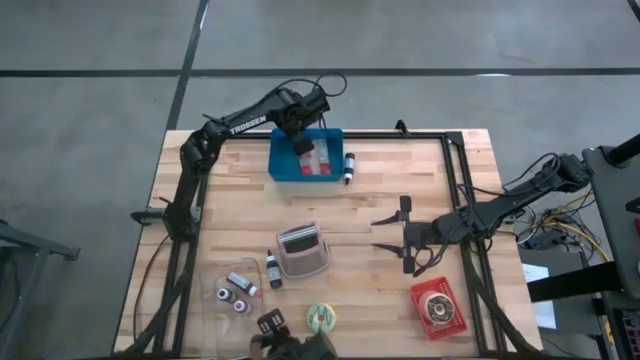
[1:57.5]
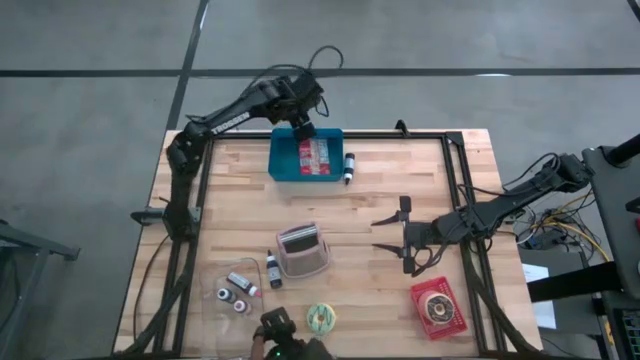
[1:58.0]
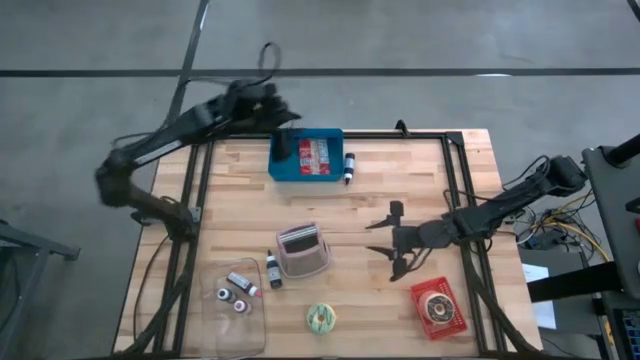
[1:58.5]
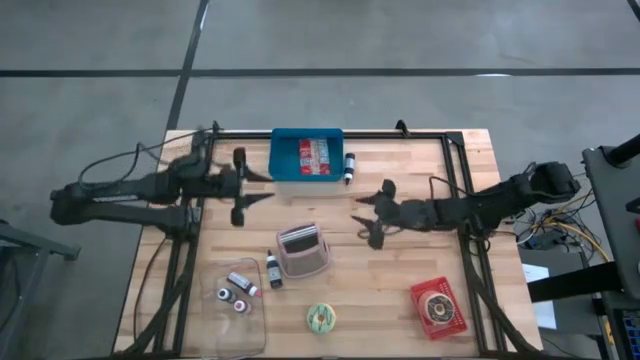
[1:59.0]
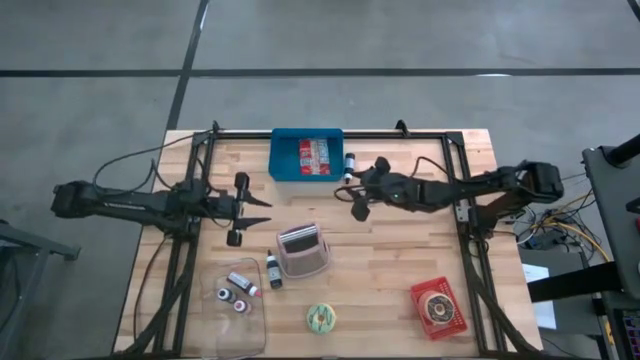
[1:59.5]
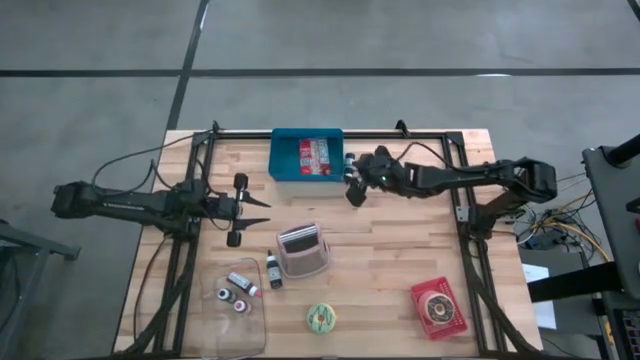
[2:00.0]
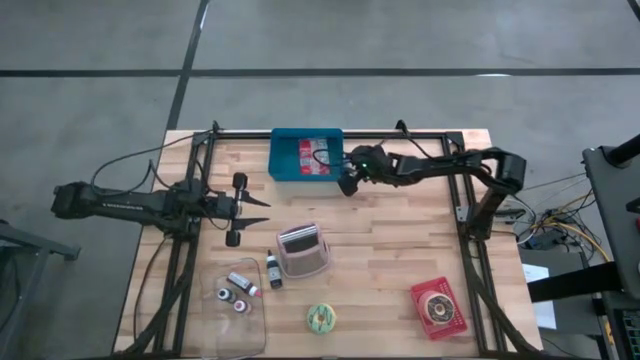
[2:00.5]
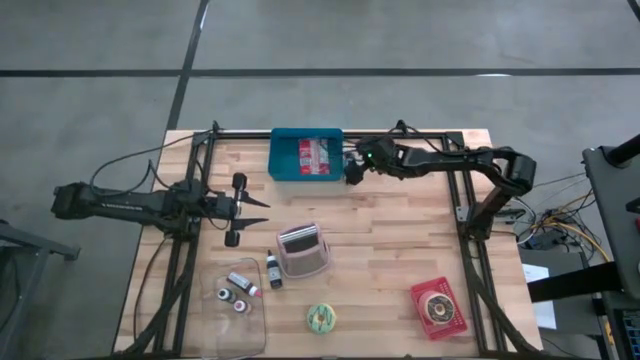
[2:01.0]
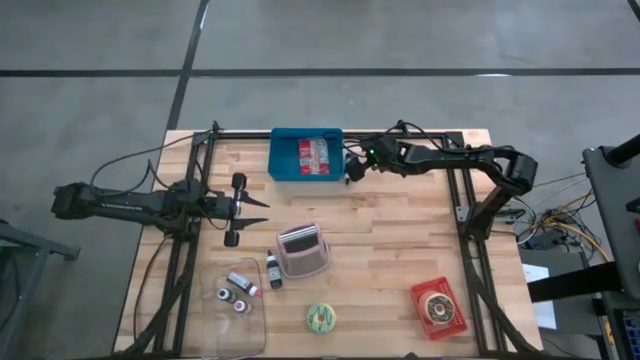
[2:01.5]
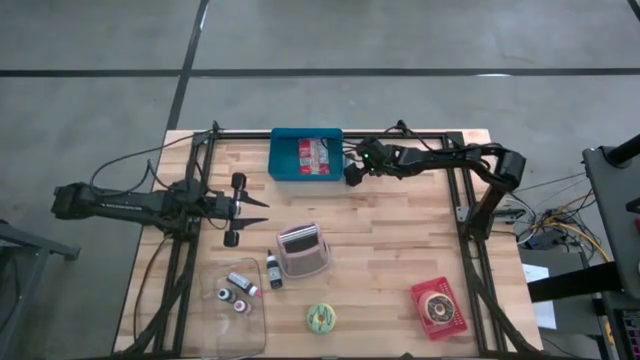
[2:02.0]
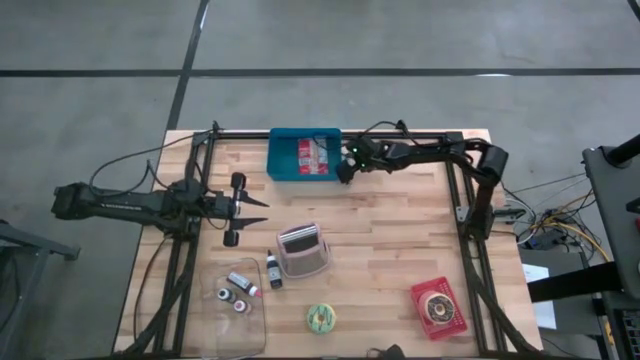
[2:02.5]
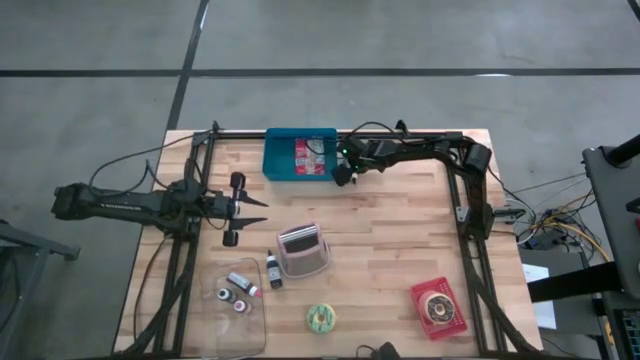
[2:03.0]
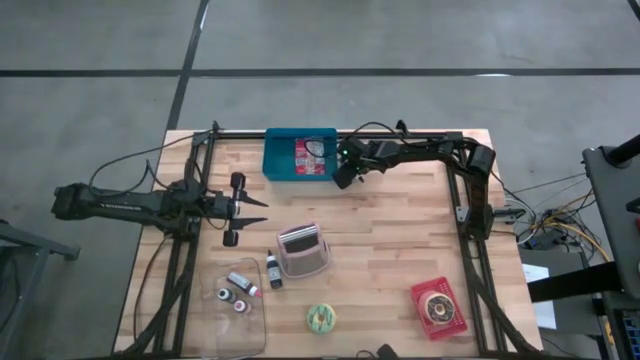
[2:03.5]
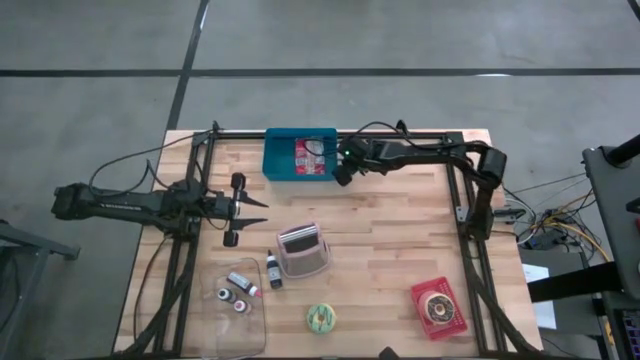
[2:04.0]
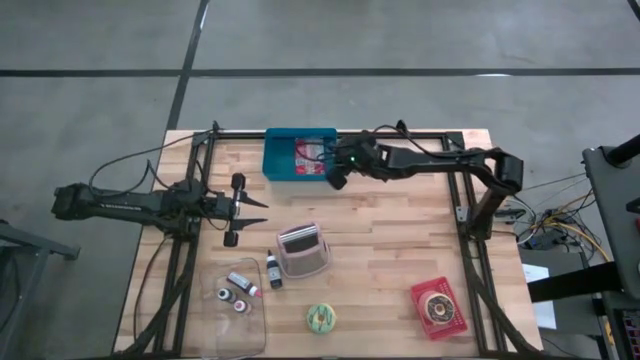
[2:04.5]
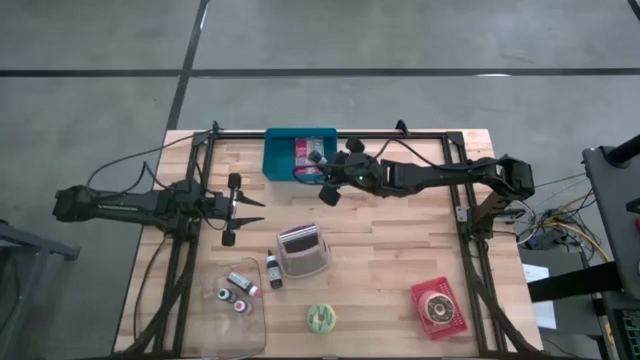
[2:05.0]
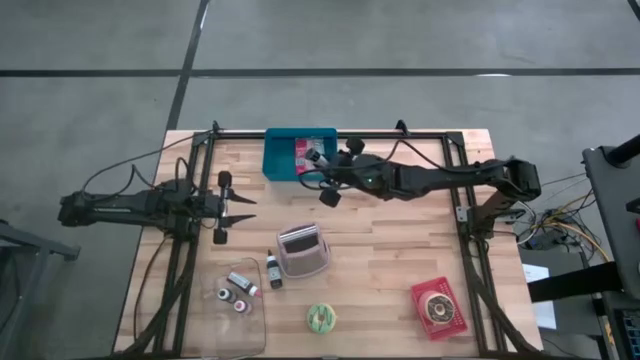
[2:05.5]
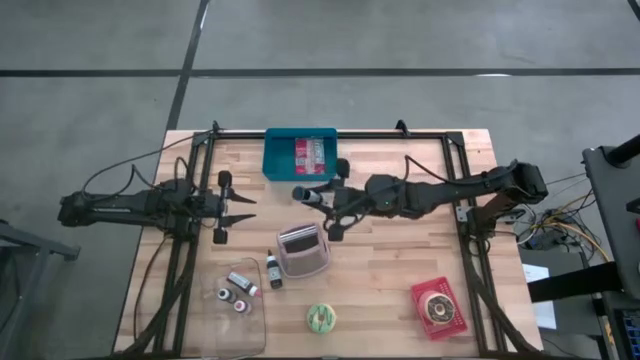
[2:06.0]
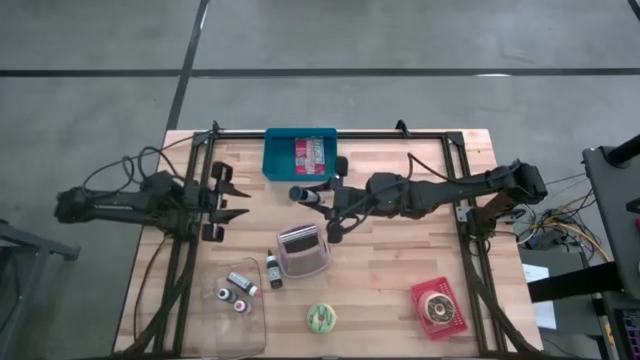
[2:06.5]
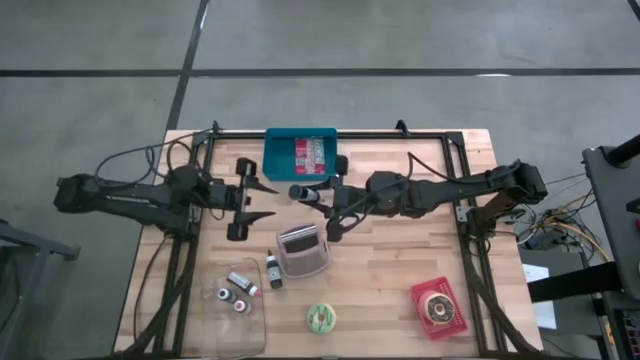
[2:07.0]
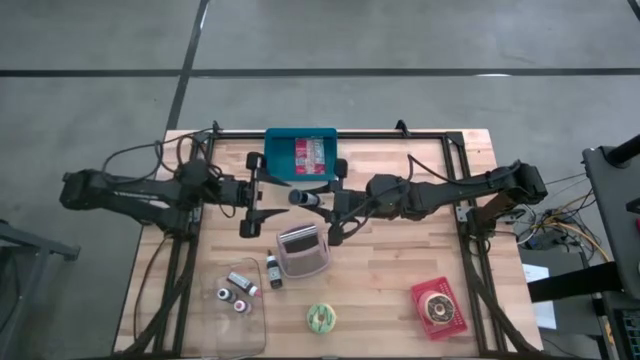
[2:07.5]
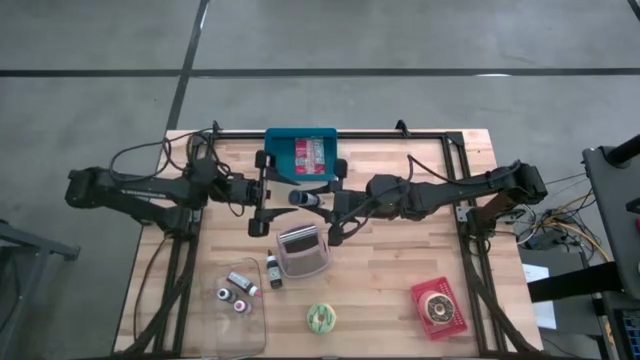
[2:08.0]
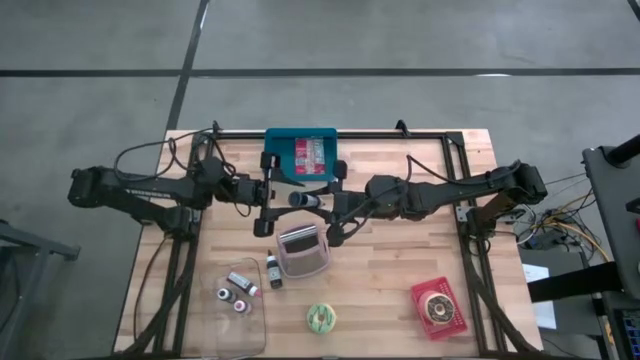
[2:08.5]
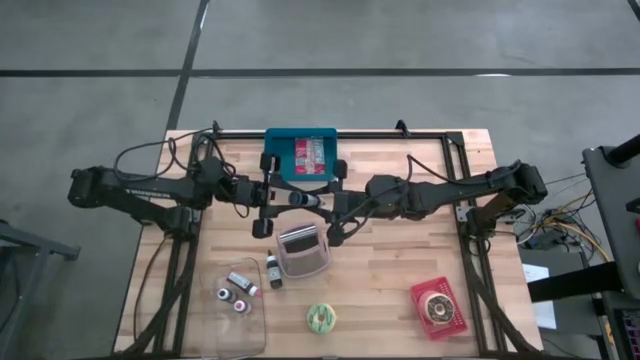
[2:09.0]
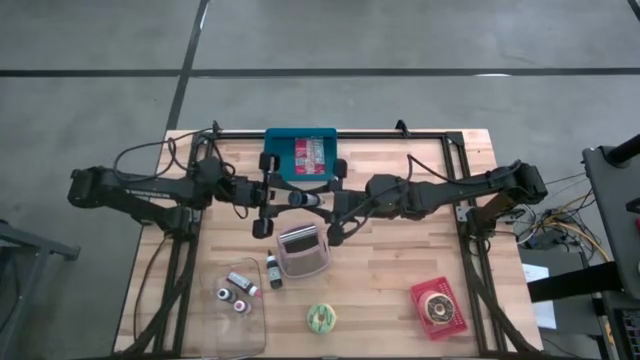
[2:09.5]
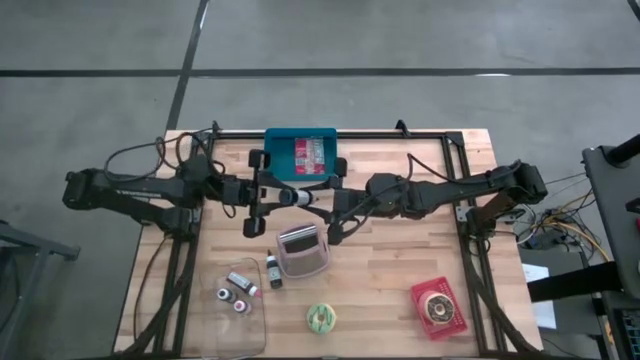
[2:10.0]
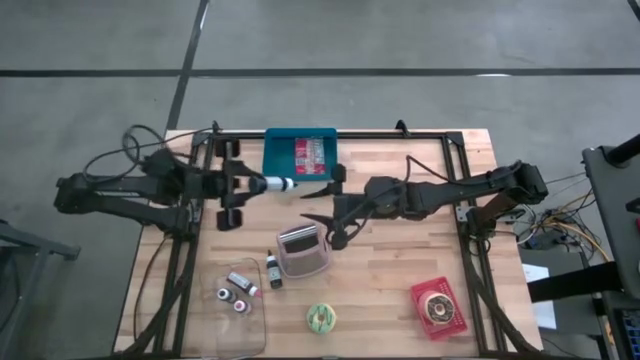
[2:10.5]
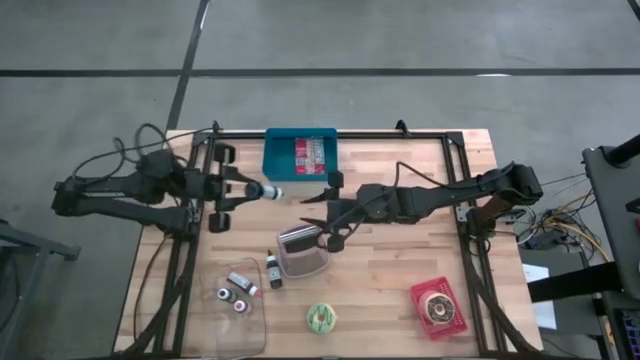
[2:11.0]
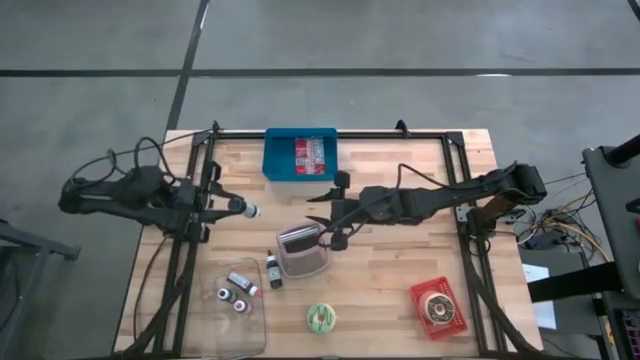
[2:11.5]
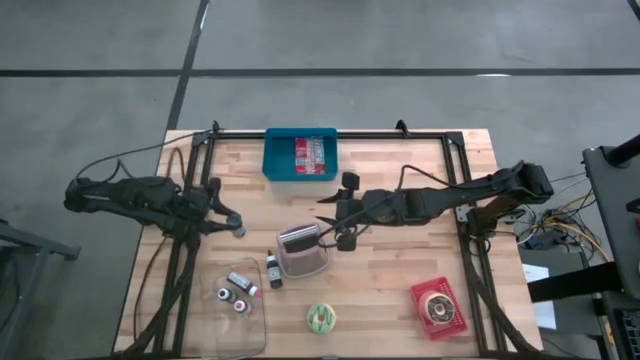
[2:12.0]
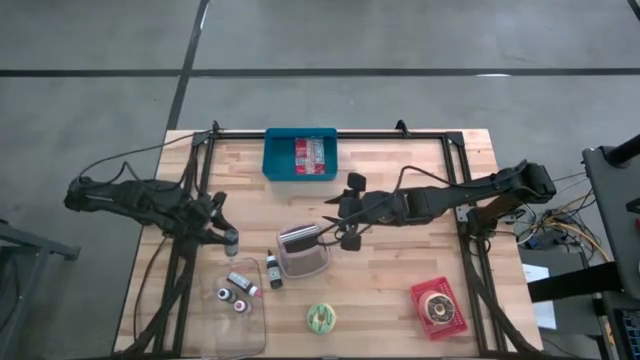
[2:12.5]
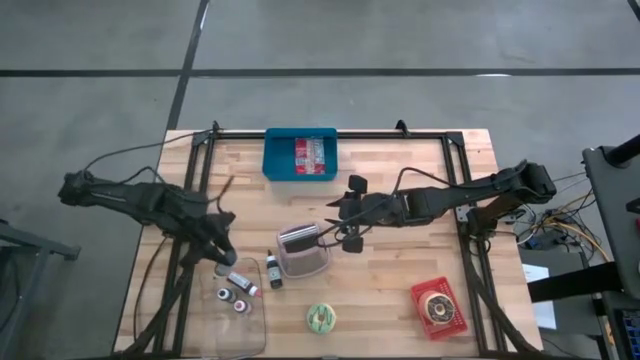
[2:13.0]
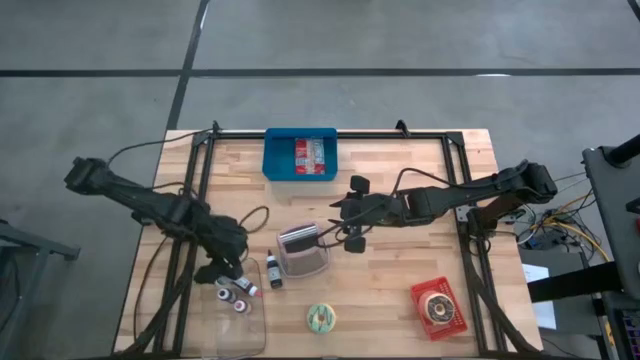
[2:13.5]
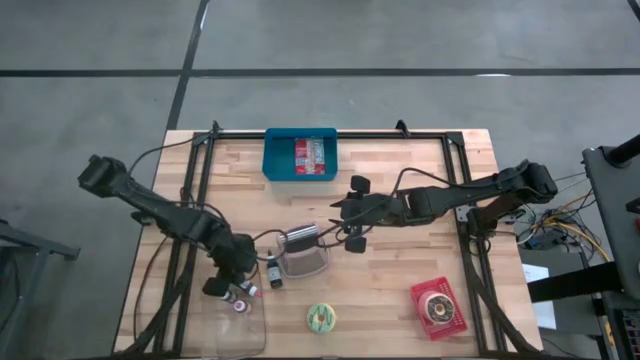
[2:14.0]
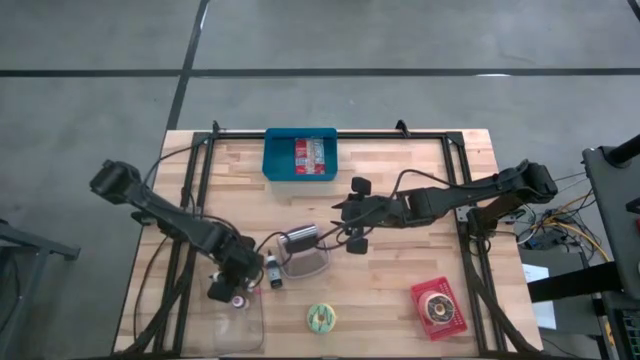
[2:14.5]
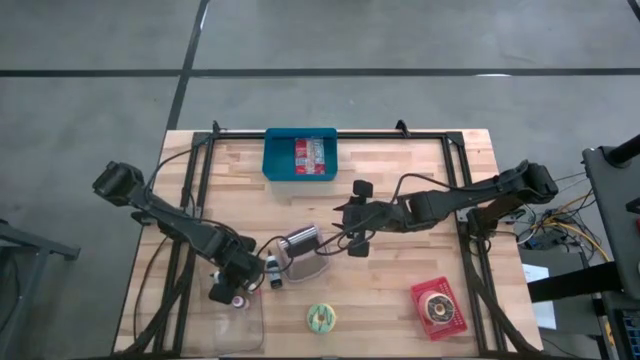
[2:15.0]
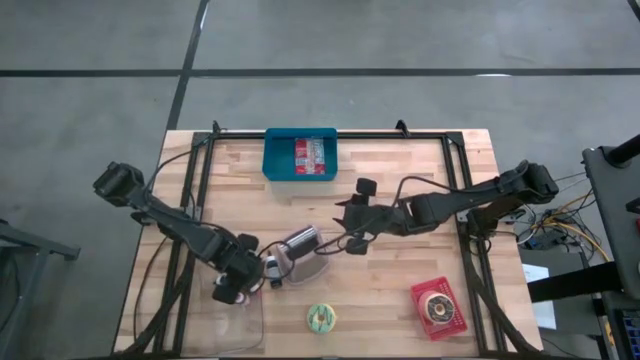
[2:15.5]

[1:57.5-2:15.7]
Task: Pick & Place Food Item
Put the top black food coloring bottle into the transparent bin

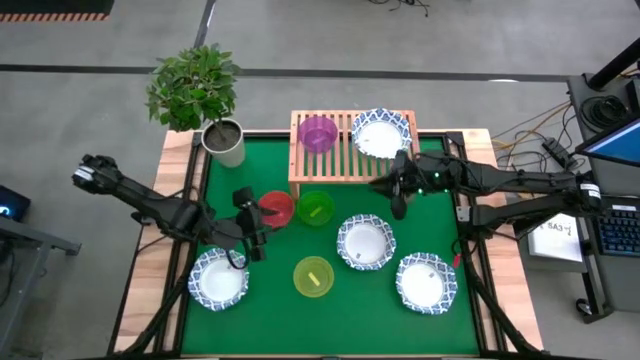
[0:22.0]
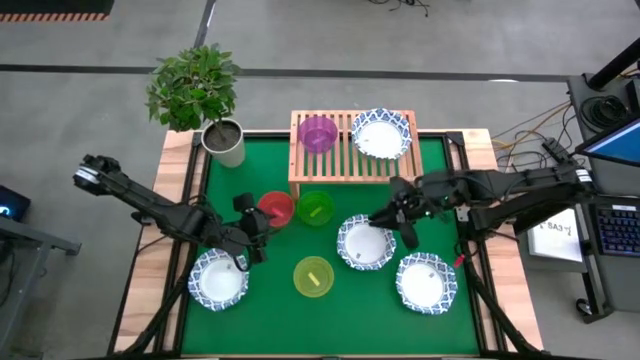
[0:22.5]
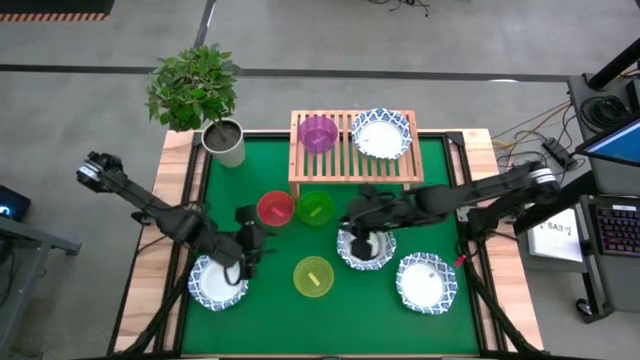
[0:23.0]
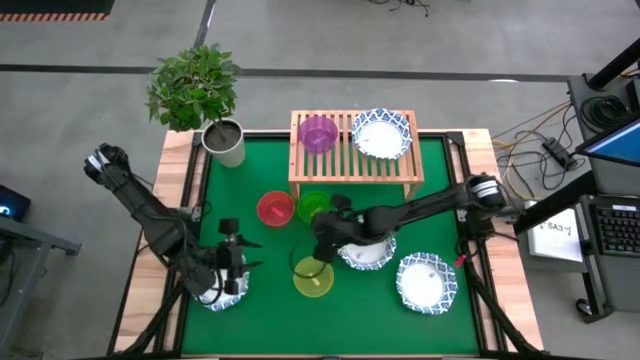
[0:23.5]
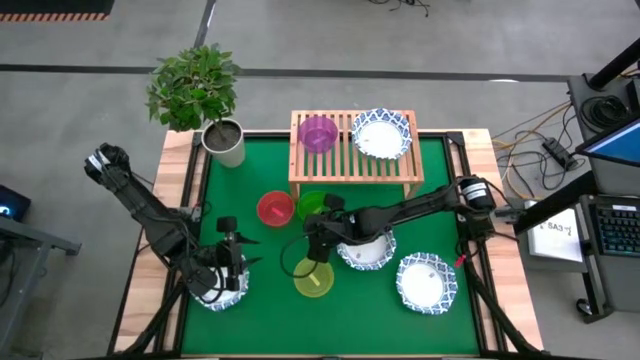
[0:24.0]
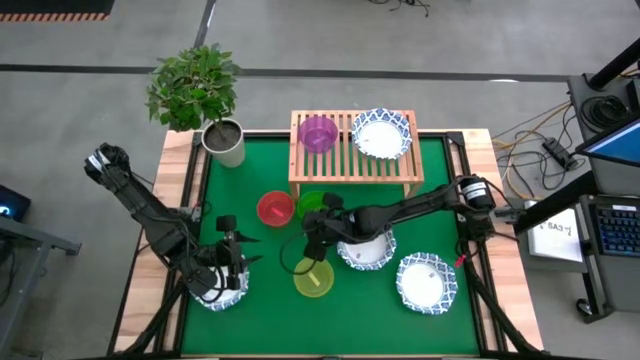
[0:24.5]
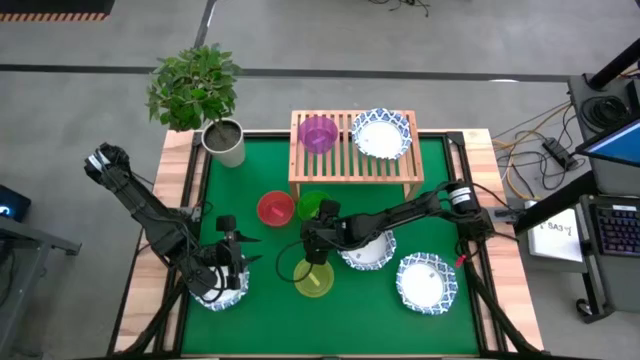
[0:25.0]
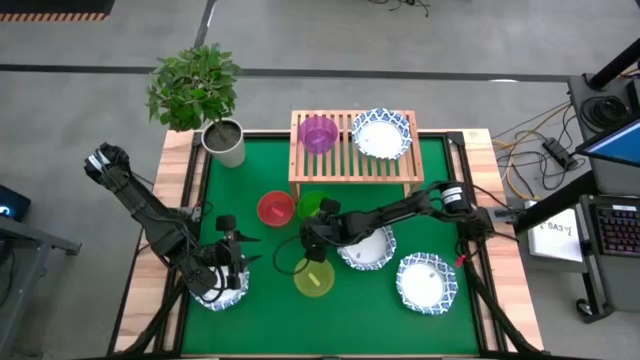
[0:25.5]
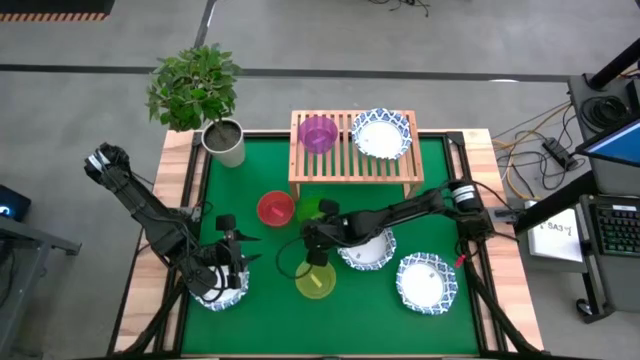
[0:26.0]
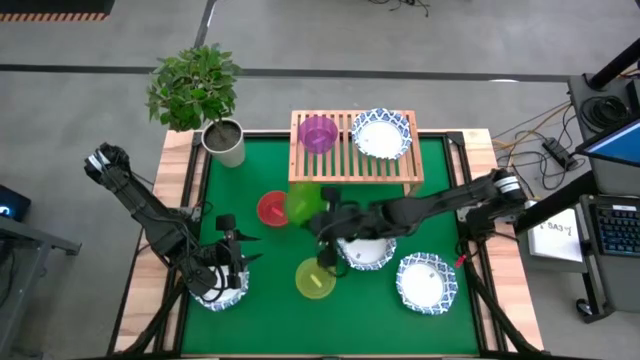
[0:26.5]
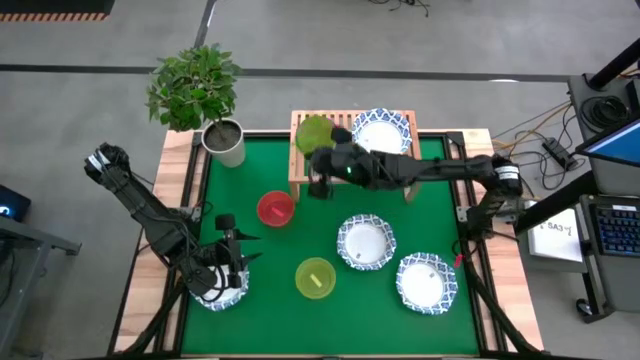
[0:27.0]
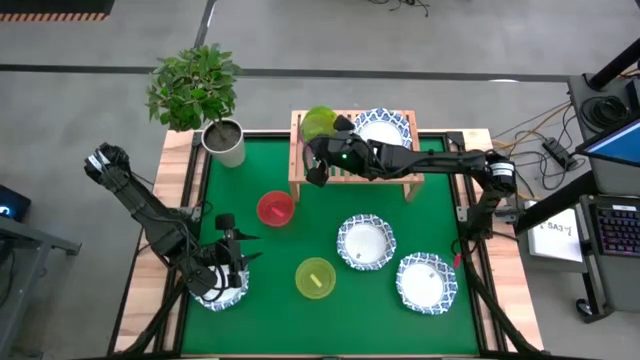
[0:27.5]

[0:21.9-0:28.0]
Task: Place and stack bowls onto a shelf
Stack the green bowl on top of the purple bowl on the shelf
